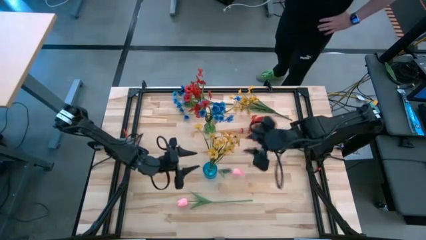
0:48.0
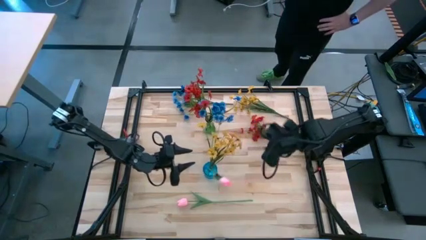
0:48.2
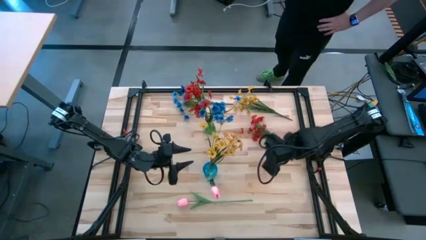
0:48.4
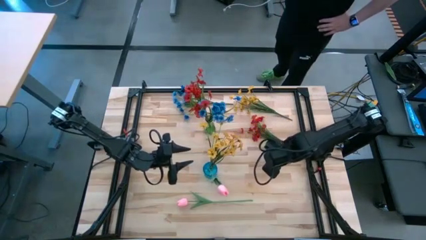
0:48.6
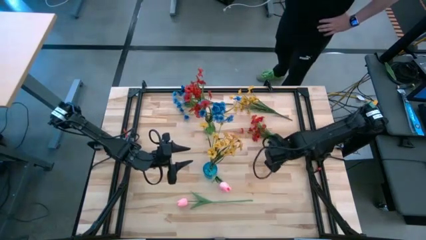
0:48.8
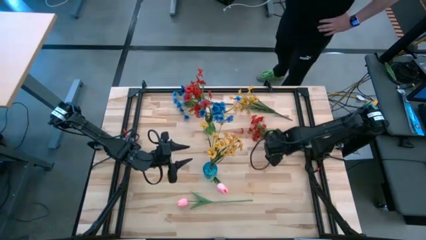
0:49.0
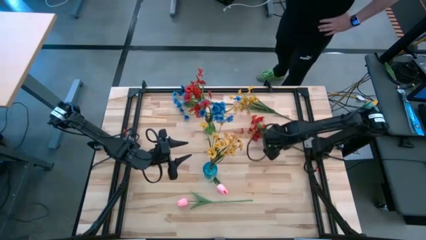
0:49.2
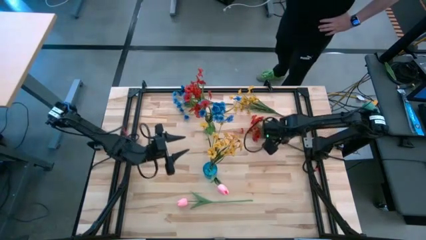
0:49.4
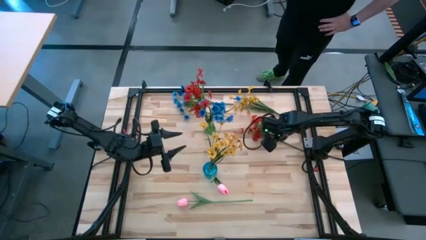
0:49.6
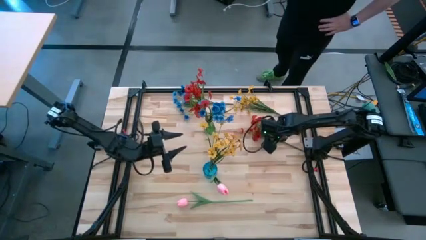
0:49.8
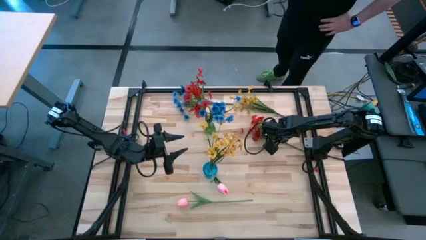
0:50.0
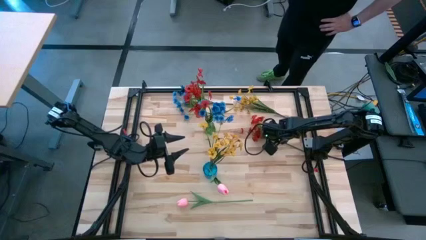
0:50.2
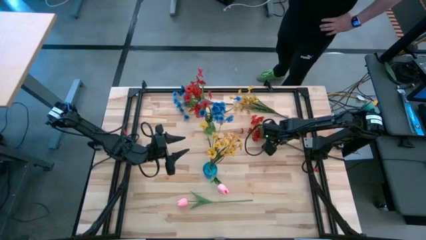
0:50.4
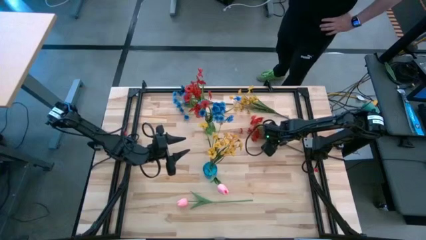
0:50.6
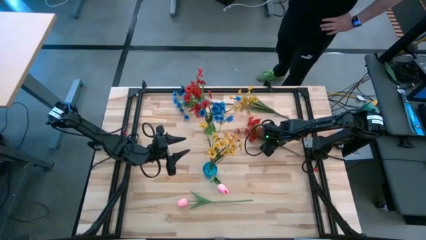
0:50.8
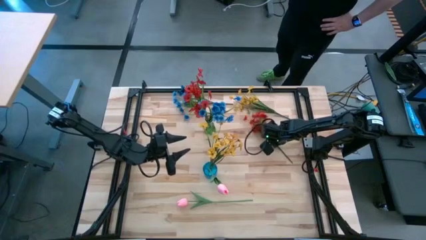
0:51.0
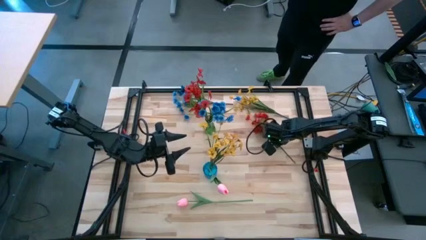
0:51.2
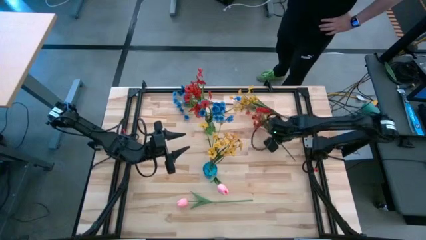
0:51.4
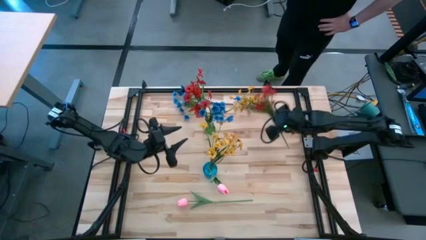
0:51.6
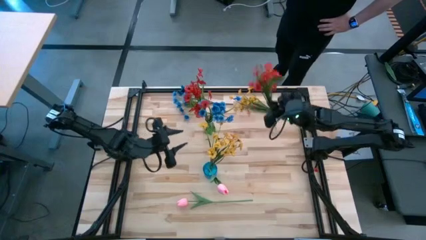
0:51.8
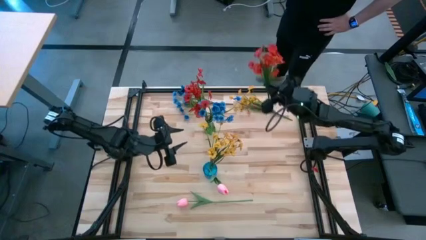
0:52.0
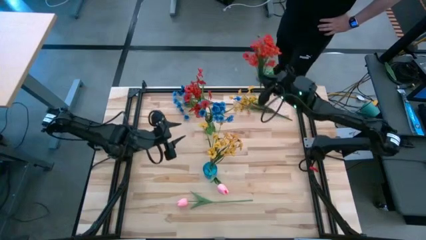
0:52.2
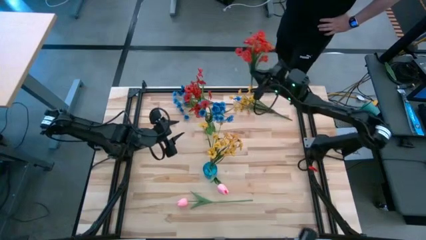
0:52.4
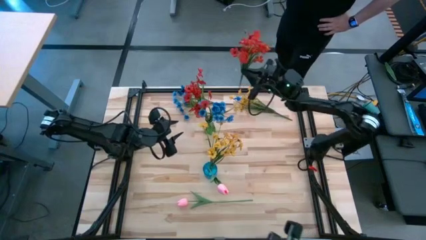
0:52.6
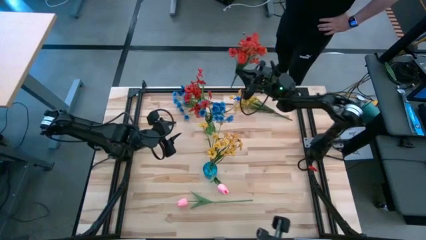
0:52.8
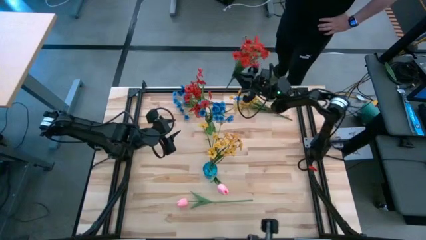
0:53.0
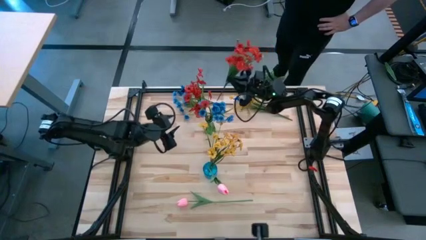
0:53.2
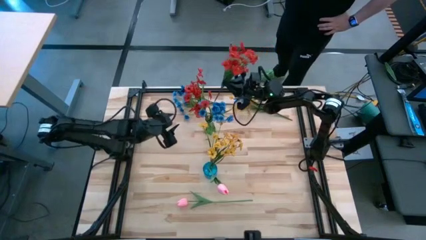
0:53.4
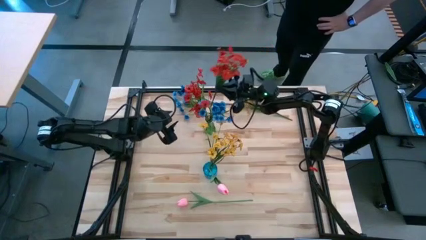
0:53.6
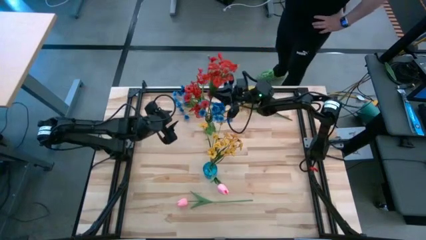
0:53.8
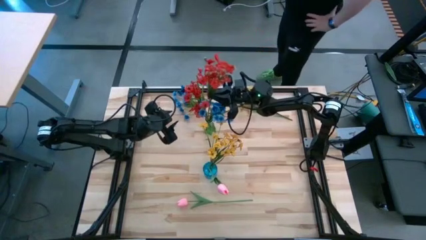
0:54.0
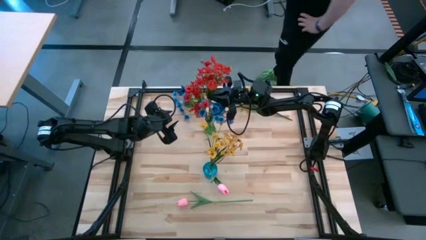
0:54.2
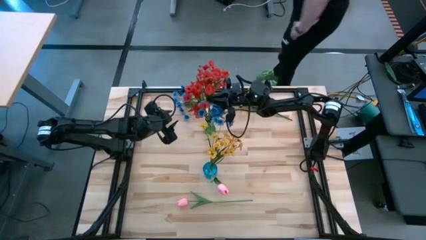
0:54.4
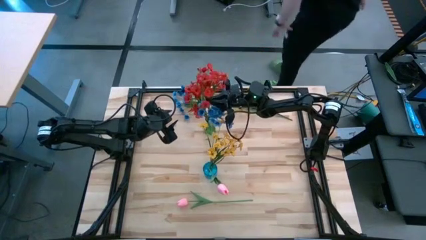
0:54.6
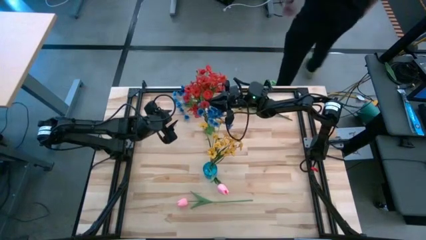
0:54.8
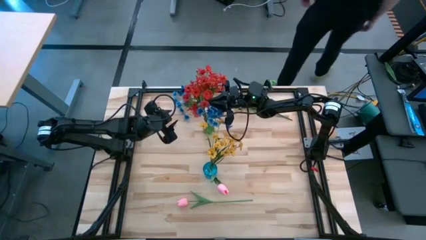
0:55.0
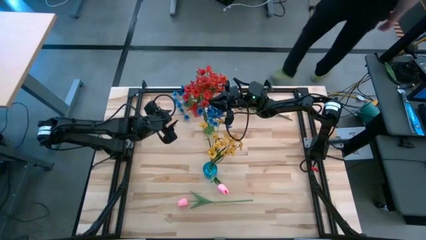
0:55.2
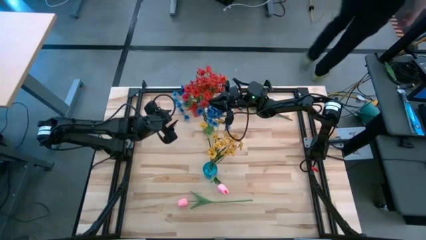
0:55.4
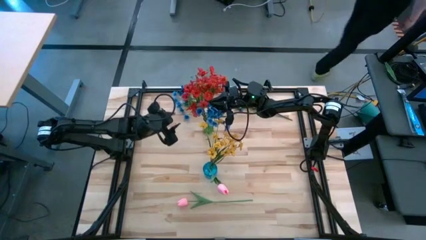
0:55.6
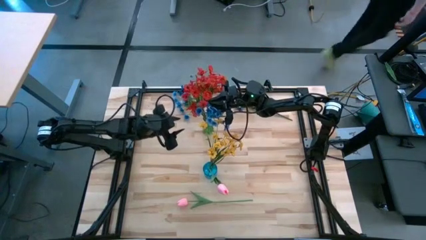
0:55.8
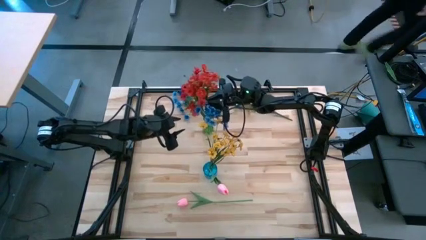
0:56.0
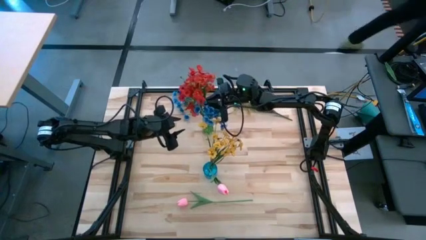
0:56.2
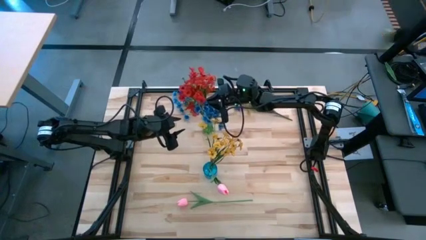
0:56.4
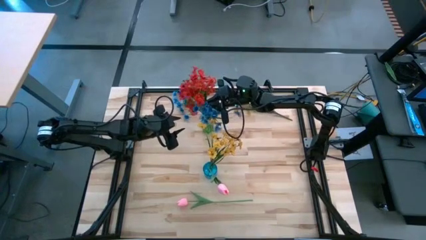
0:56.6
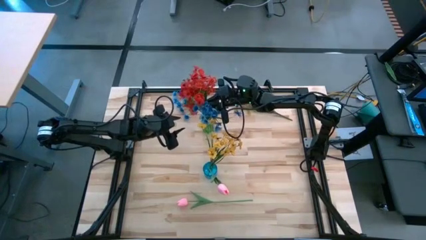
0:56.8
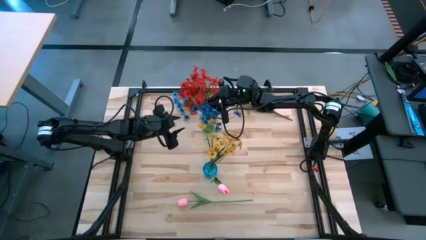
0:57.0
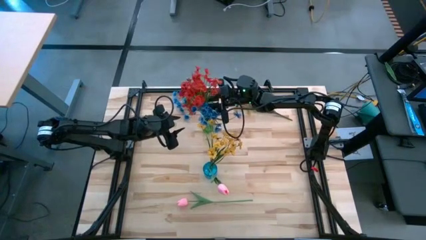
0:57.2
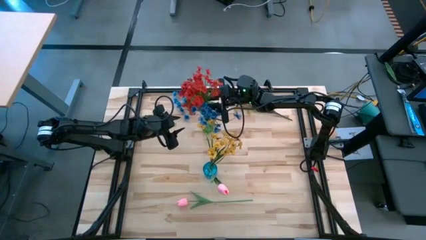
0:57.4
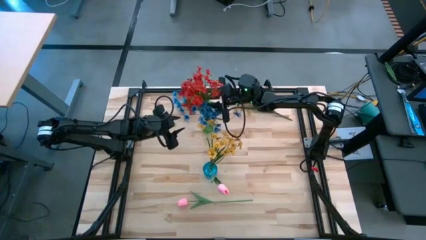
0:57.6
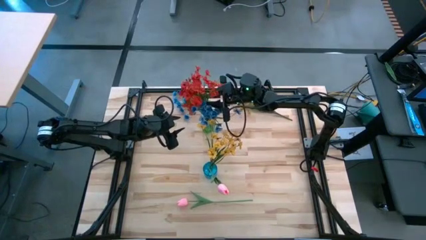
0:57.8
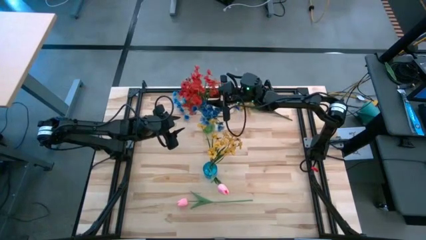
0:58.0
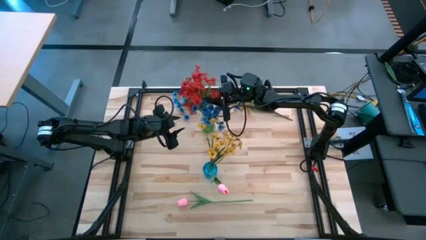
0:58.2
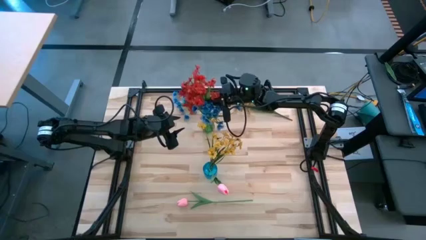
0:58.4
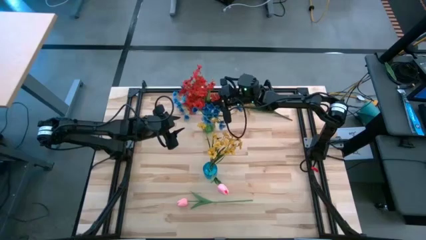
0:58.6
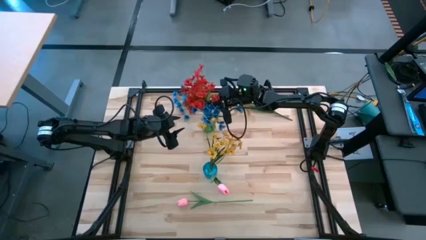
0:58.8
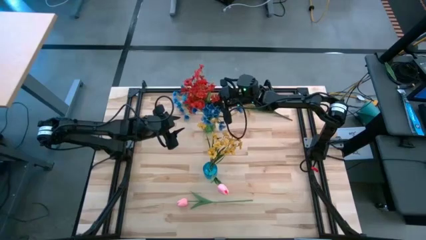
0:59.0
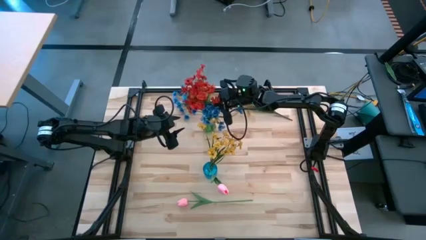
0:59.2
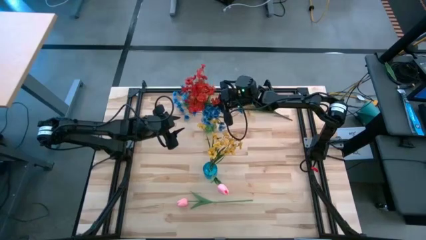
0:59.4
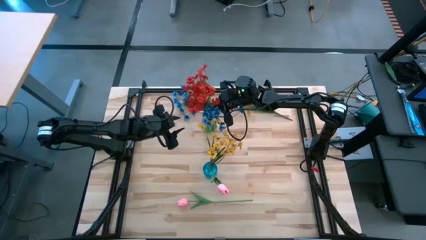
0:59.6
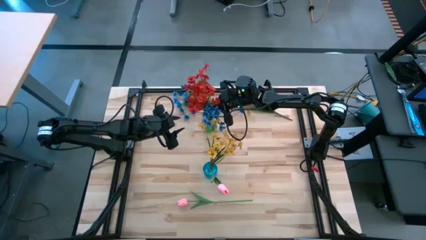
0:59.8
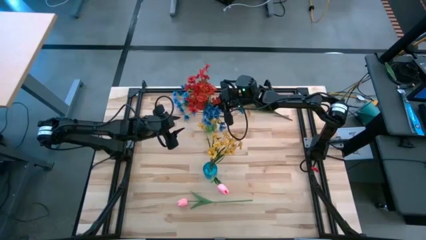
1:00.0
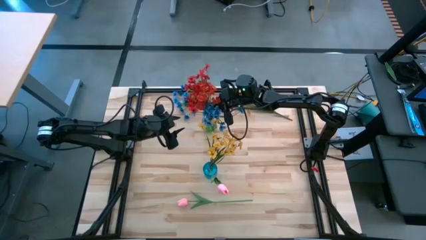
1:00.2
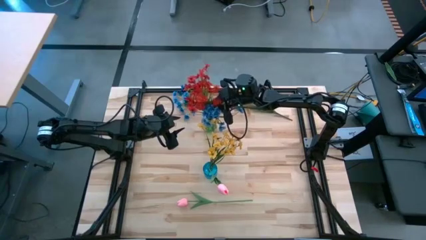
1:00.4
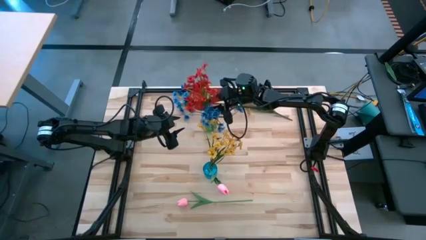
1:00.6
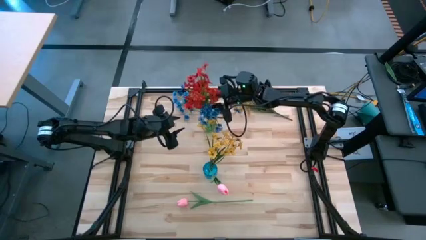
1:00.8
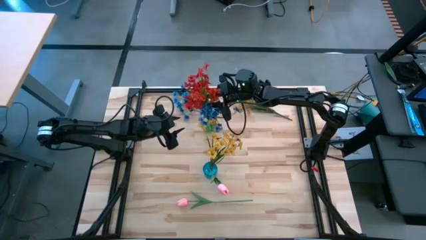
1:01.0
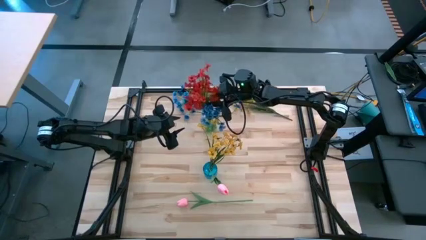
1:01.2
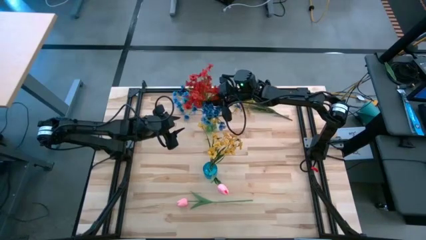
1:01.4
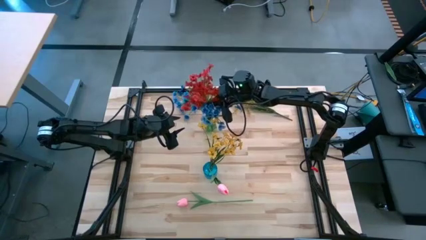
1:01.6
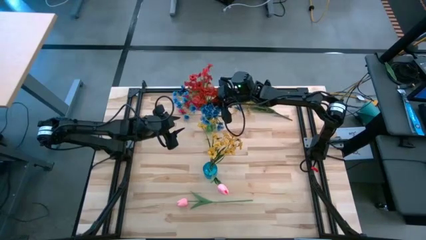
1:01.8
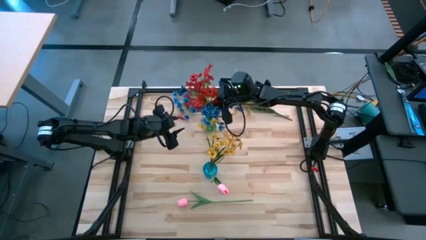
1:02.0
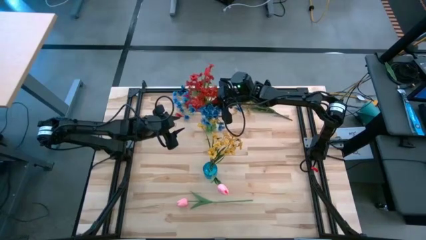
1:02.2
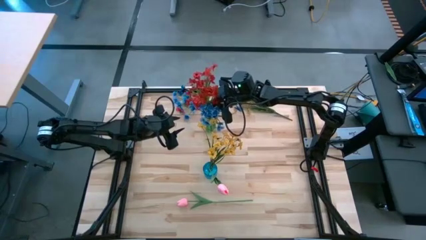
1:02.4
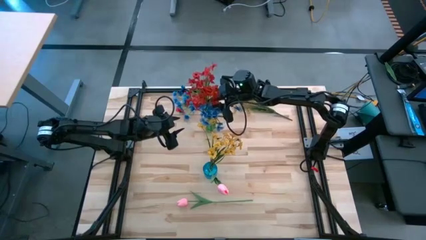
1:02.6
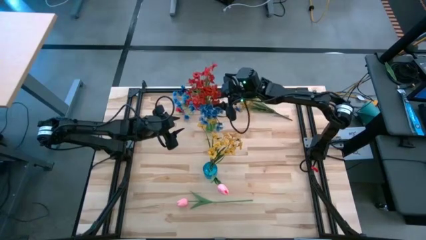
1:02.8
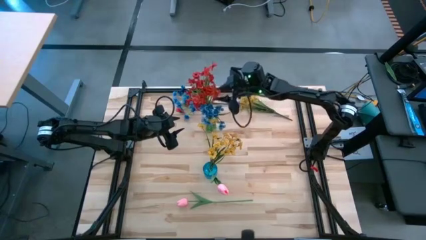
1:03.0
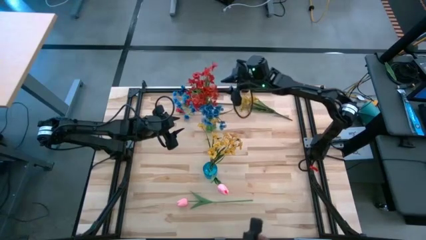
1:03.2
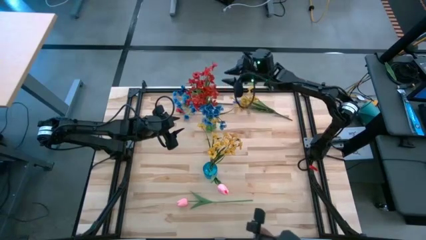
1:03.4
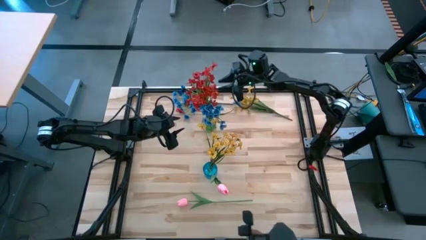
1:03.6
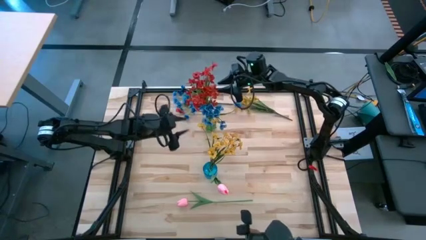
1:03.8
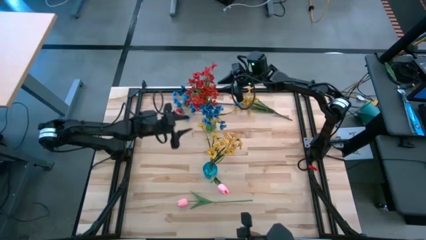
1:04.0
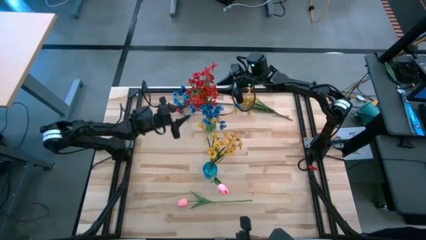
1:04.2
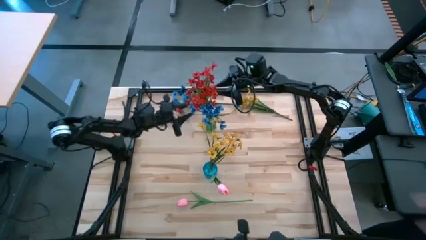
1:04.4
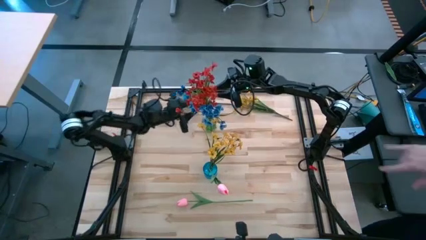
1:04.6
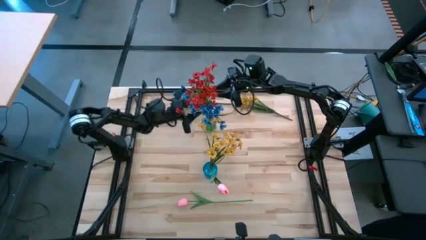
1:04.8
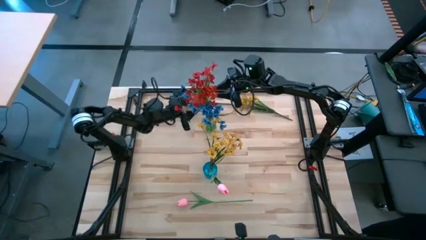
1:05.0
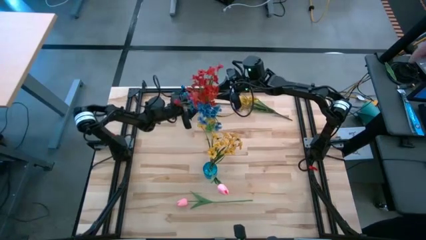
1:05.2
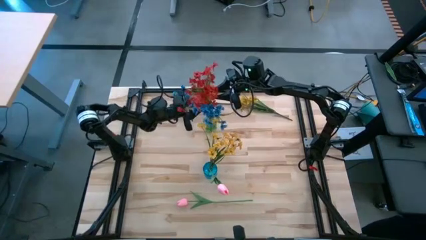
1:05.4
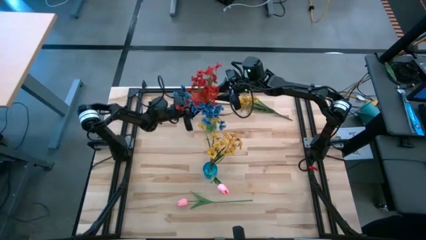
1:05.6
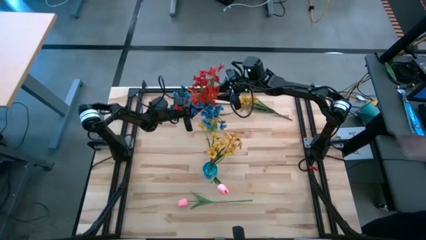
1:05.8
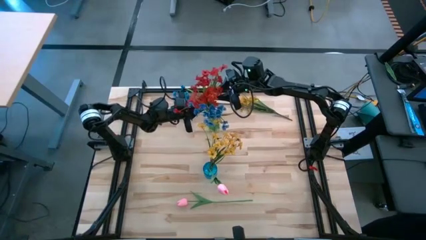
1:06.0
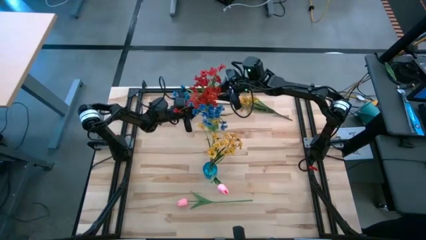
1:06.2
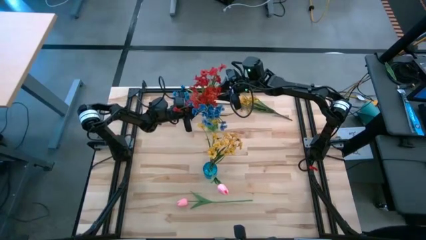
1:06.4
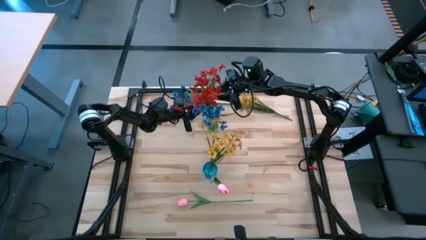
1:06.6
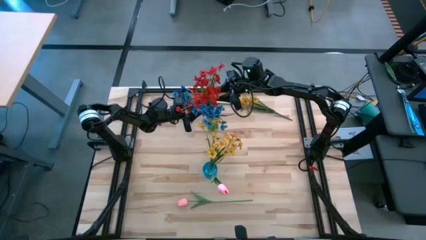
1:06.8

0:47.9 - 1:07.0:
Task: Sort flowers into vase by color
Put the red flowers into the green vase
